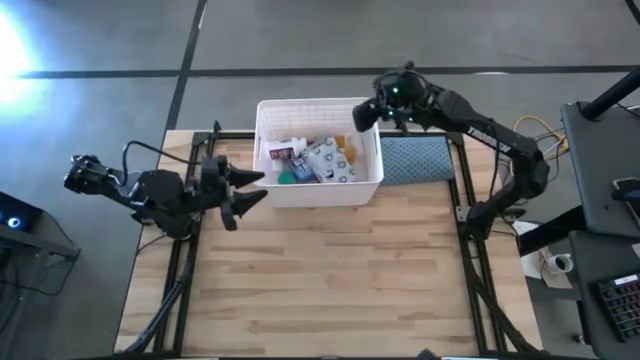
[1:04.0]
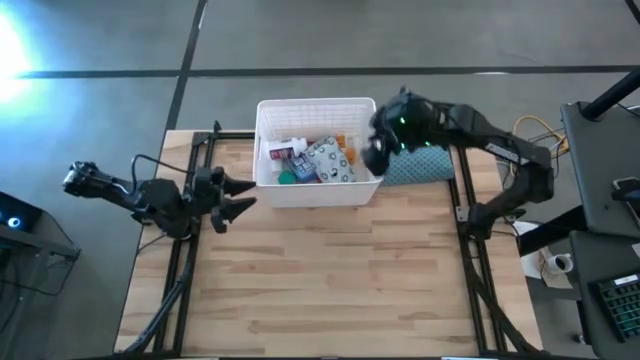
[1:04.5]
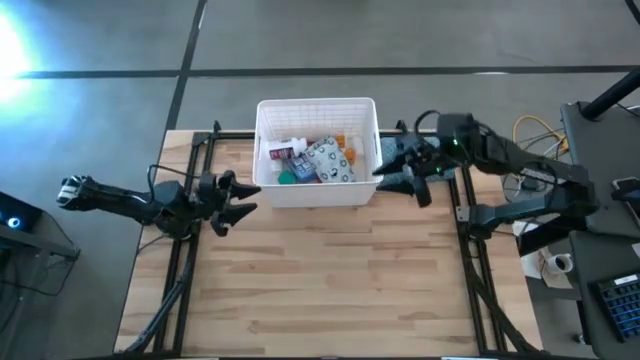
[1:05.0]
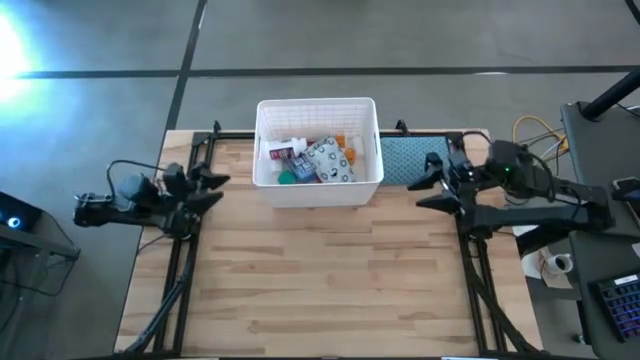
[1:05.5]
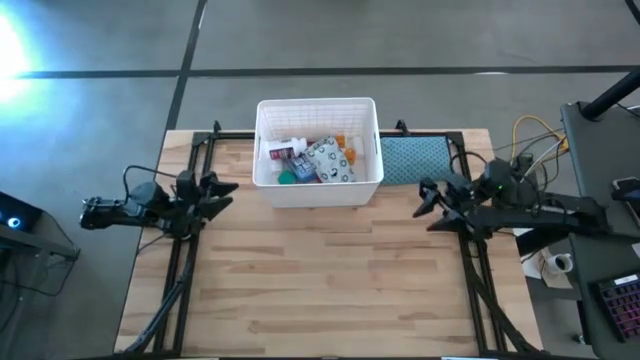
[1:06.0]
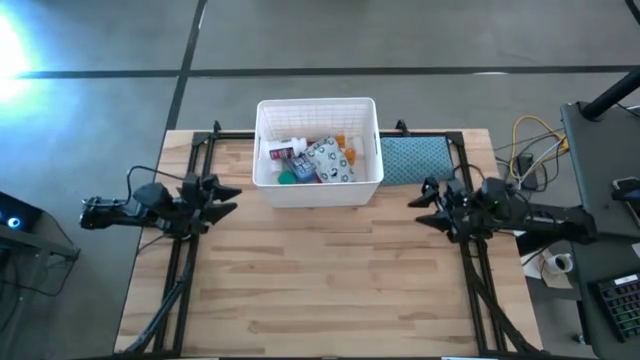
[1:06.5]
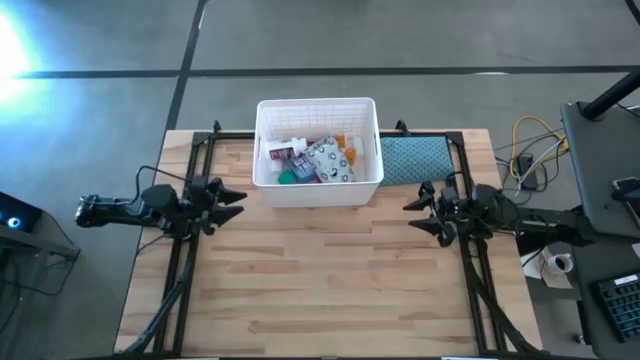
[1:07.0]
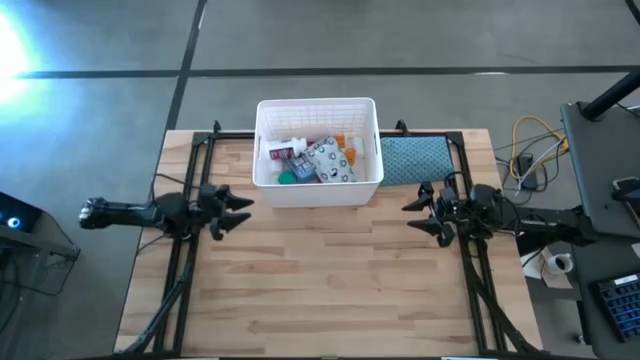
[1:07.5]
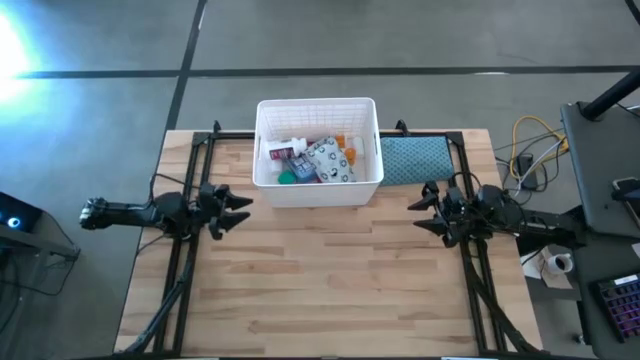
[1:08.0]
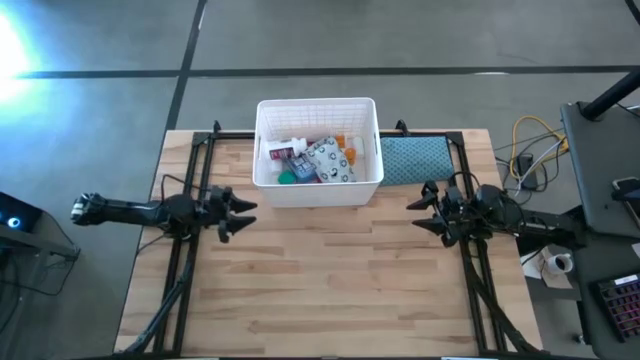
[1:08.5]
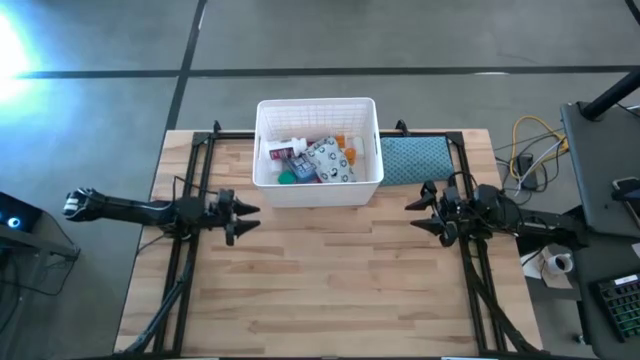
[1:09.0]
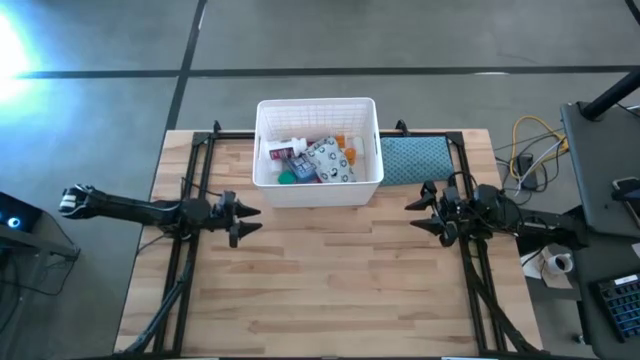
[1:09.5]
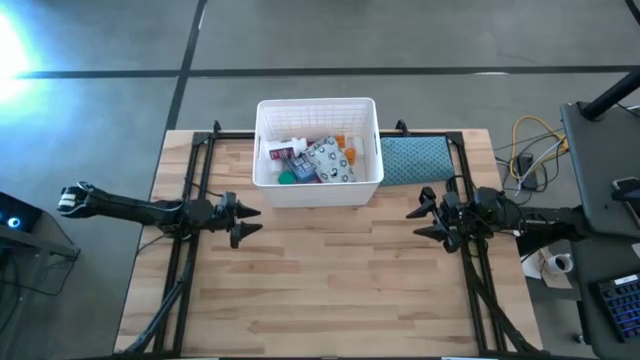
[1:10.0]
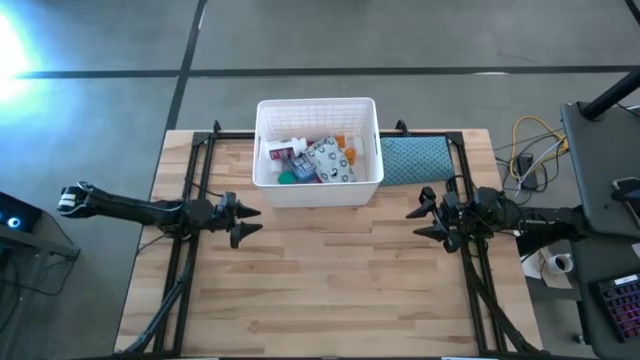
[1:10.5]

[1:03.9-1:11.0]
Task: Pick & place medical supplies in basket/bin
Return to Home Position

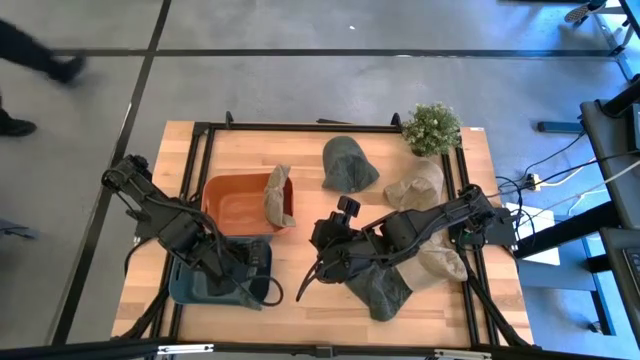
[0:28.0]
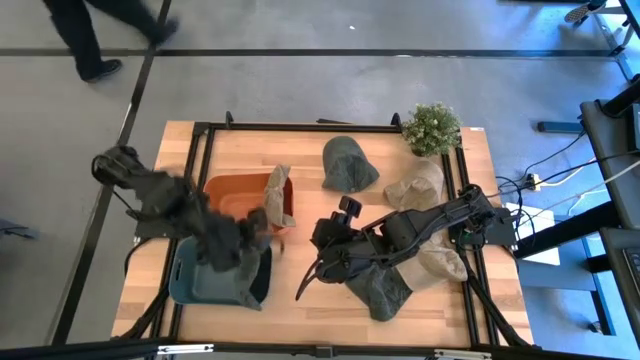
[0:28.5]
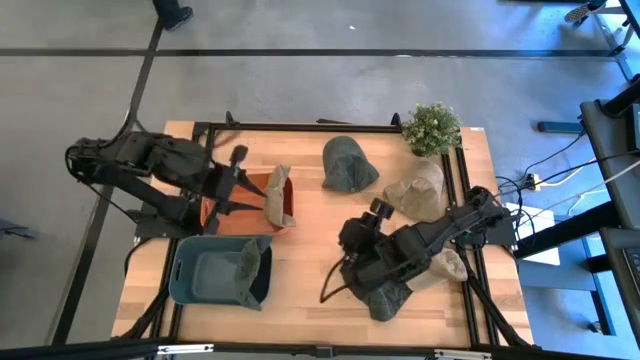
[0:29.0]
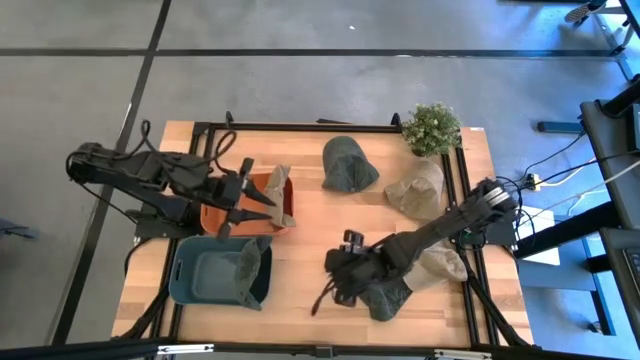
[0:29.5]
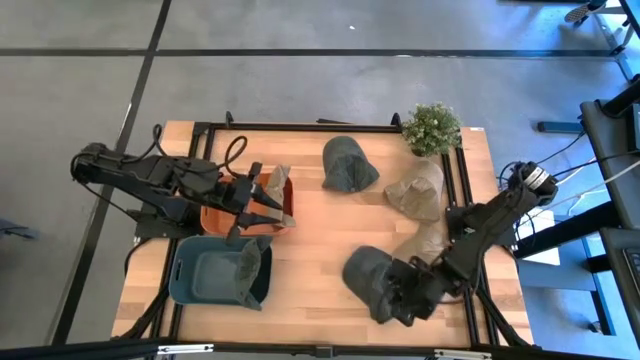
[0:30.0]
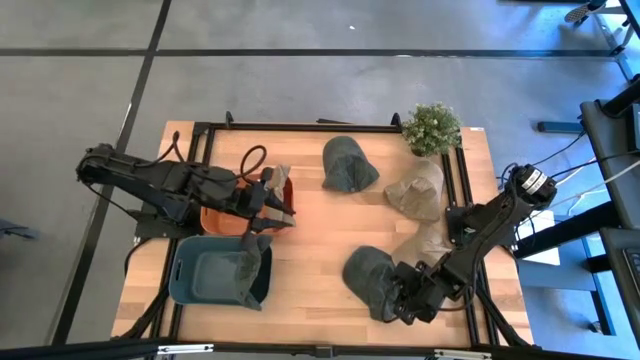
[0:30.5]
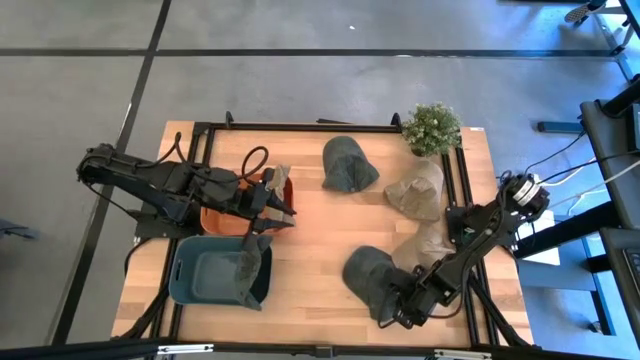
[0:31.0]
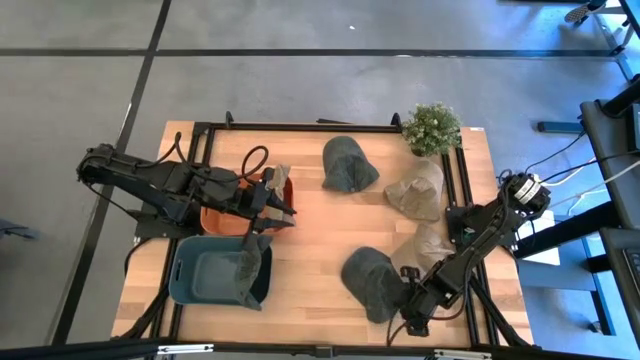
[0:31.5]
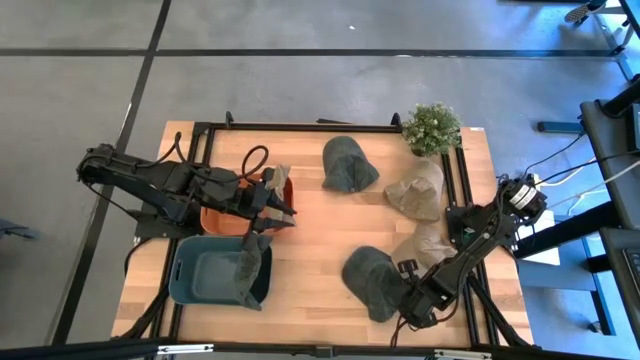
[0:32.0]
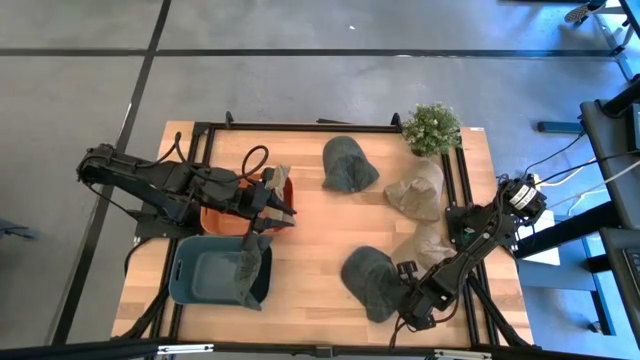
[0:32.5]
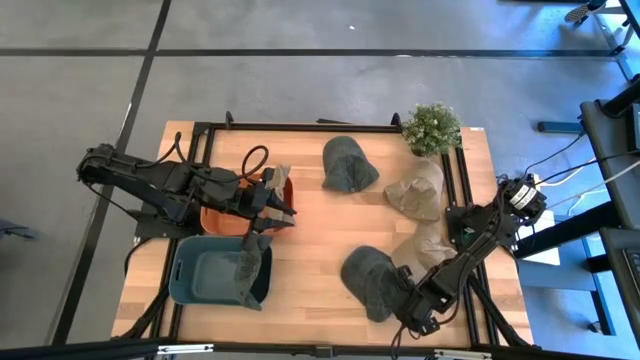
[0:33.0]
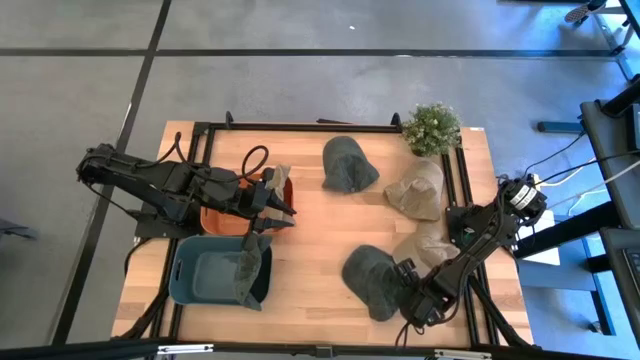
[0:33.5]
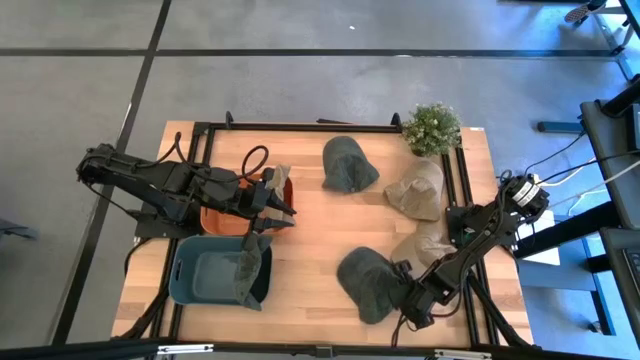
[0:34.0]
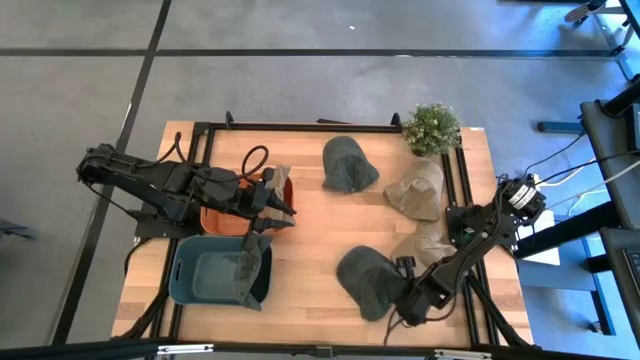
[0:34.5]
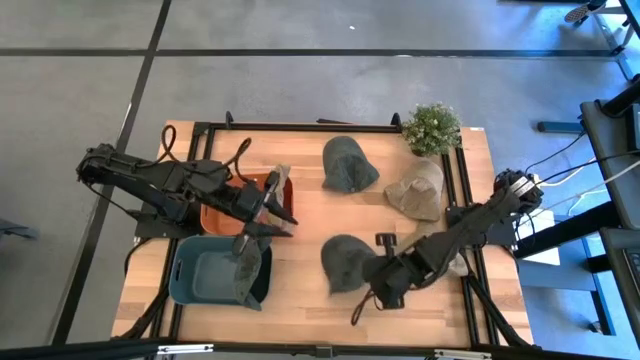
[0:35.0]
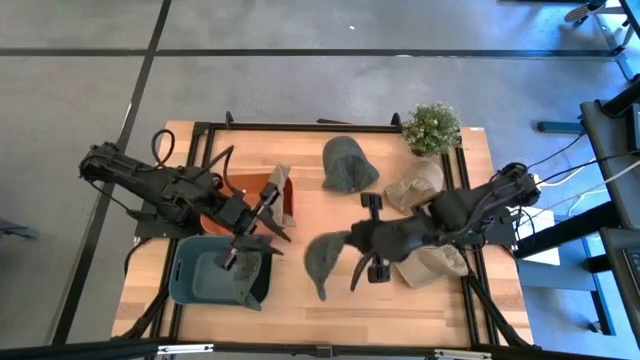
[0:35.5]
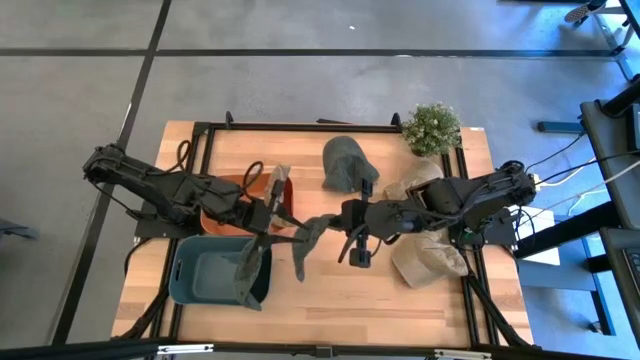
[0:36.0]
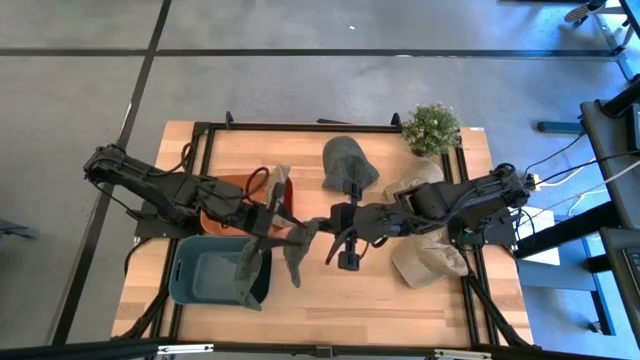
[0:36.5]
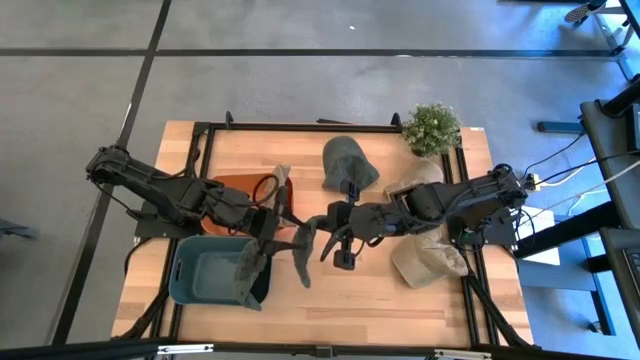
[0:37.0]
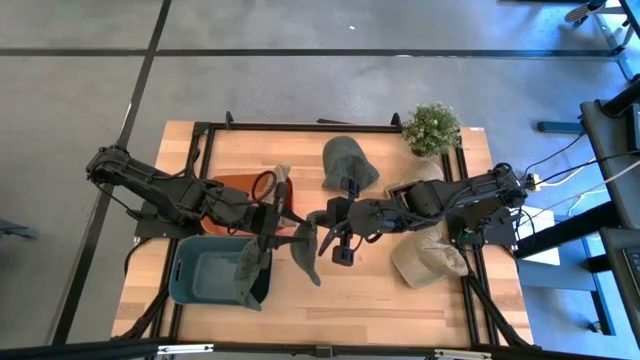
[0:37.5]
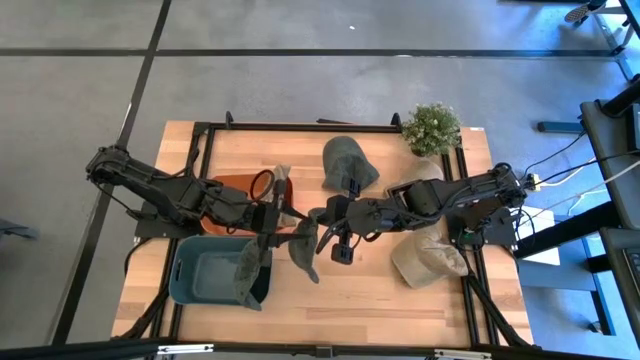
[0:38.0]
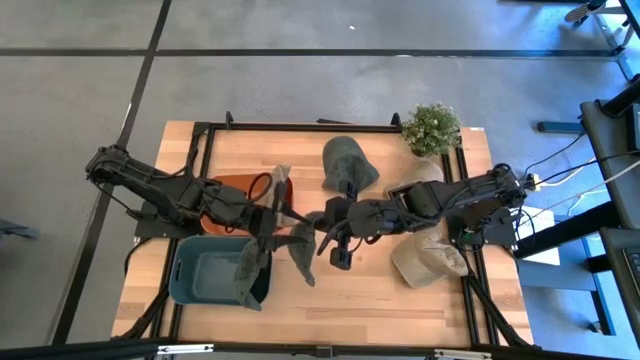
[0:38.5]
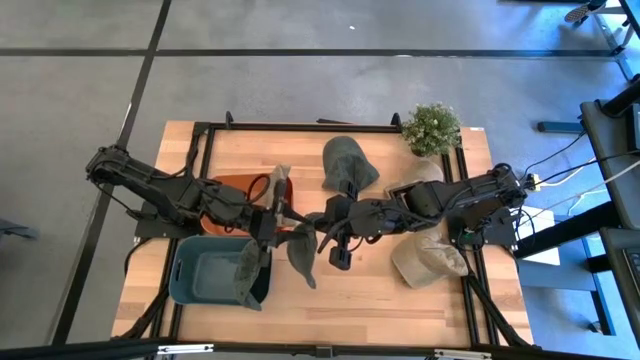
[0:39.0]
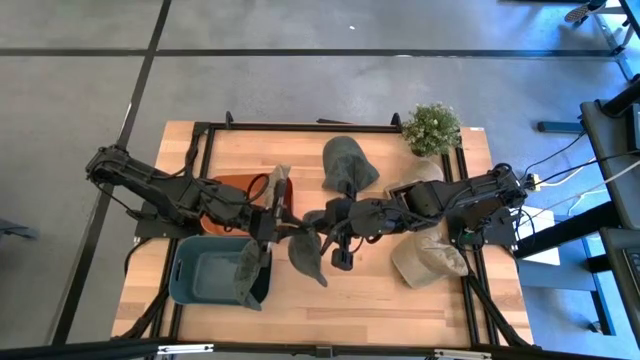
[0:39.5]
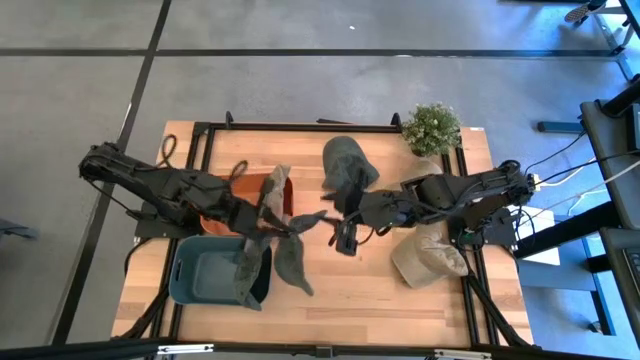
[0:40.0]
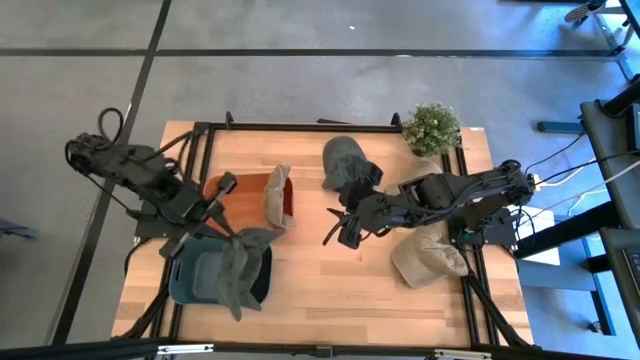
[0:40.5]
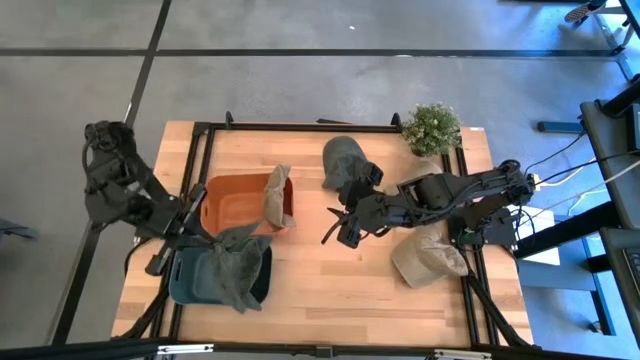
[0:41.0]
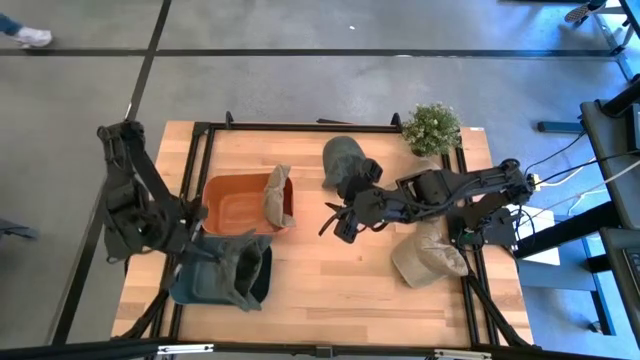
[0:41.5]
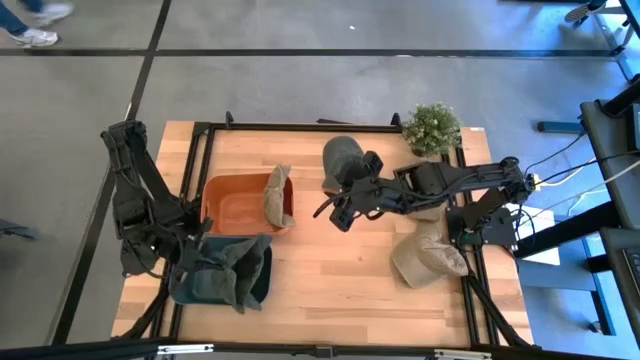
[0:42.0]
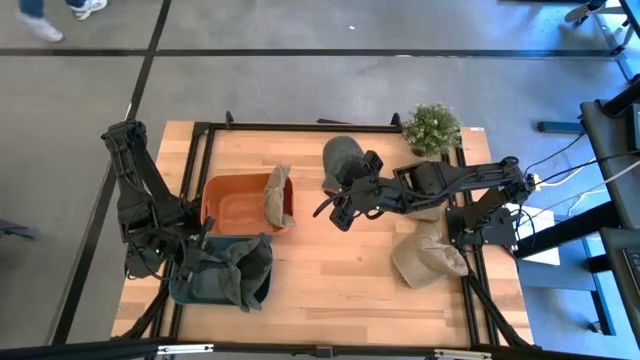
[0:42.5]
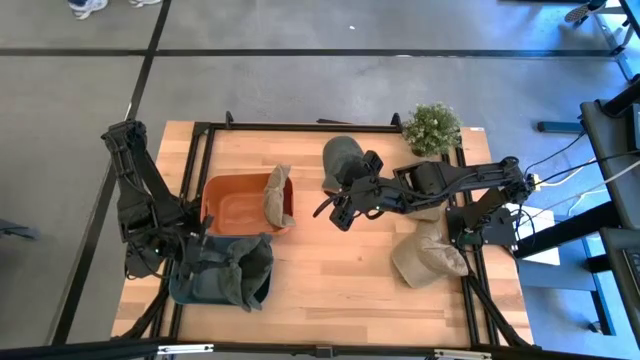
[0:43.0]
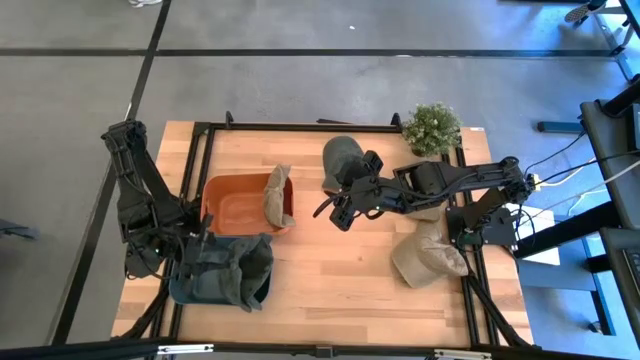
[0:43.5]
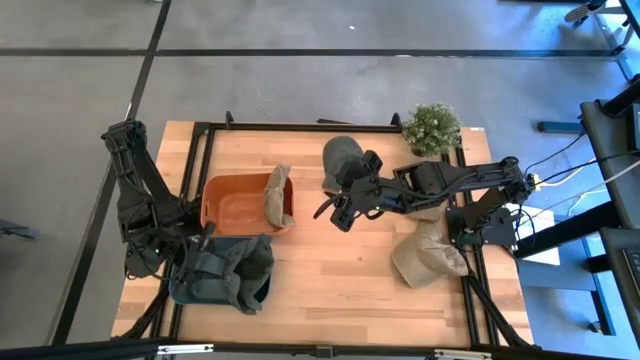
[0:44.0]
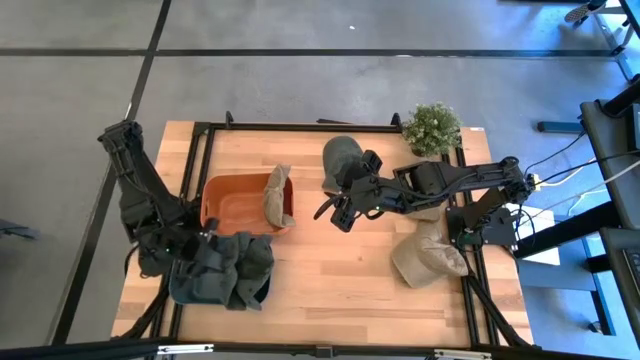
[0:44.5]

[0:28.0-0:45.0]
Task: Pick & Place hat
Put the bottom gray cap into the blue bin
